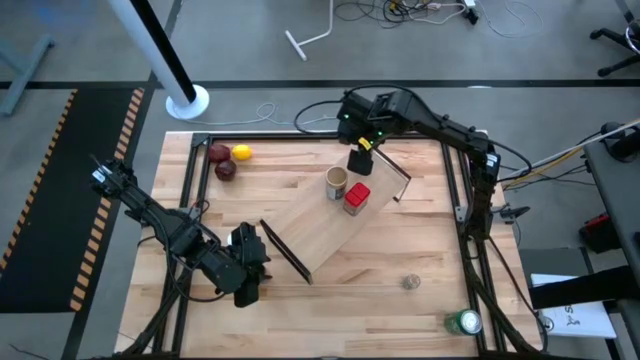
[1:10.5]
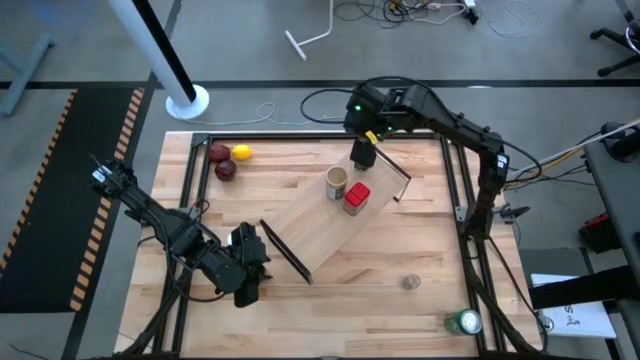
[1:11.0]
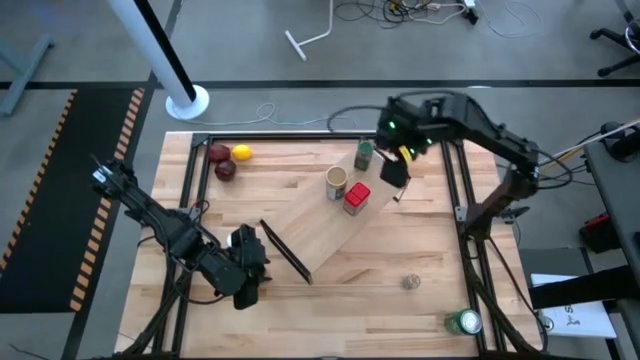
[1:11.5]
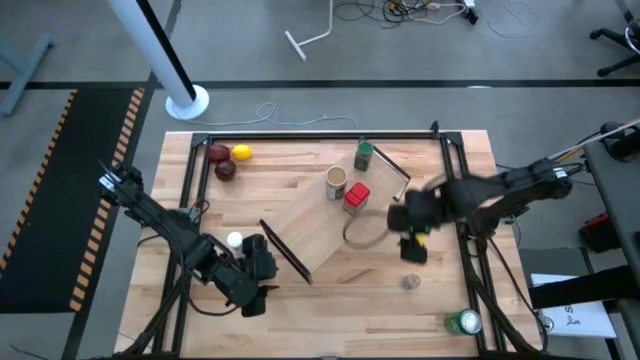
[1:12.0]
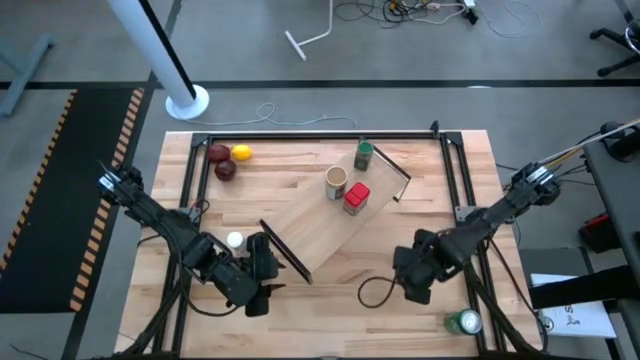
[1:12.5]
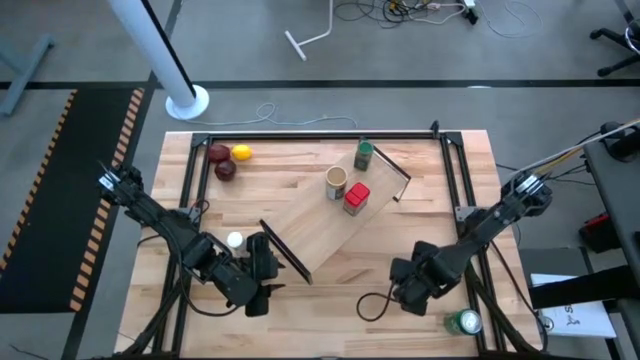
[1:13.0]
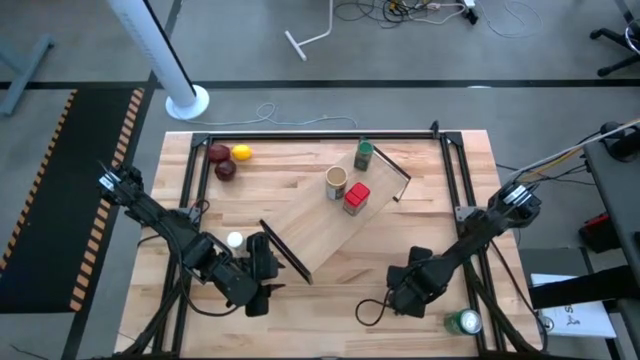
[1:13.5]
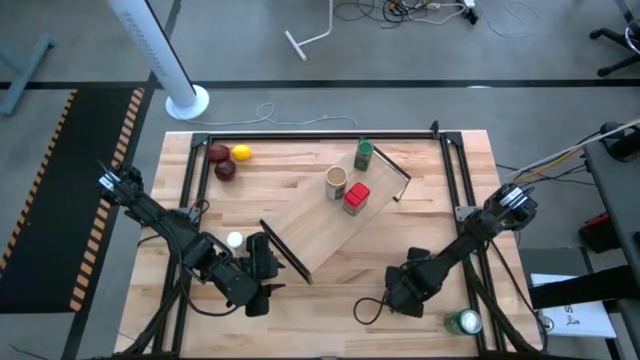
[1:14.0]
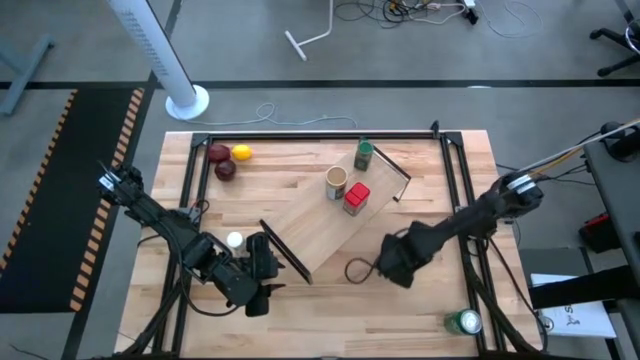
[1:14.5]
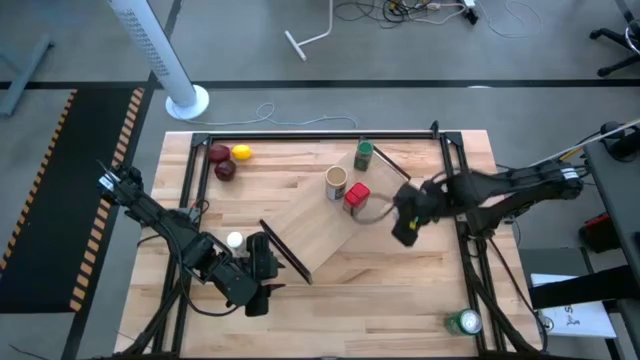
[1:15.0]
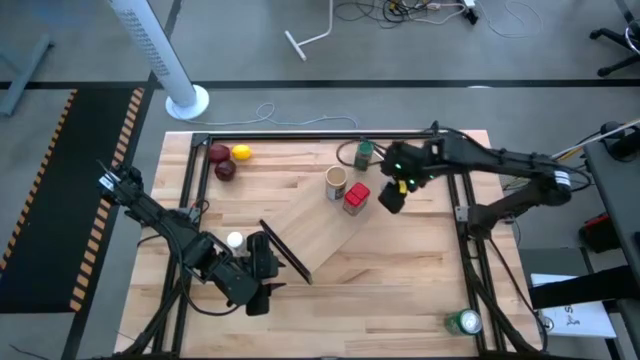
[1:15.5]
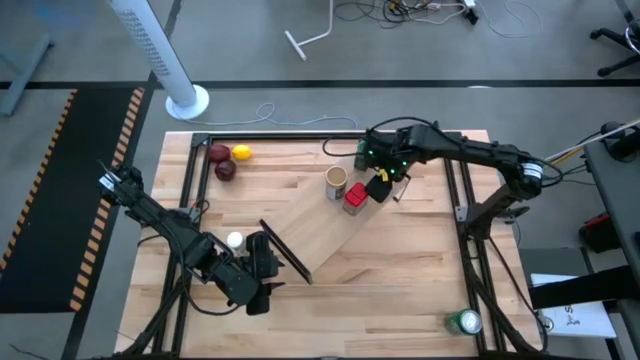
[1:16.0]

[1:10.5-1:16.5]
Task: Shelf spices
Put the brown seasoning bottle on the shelf

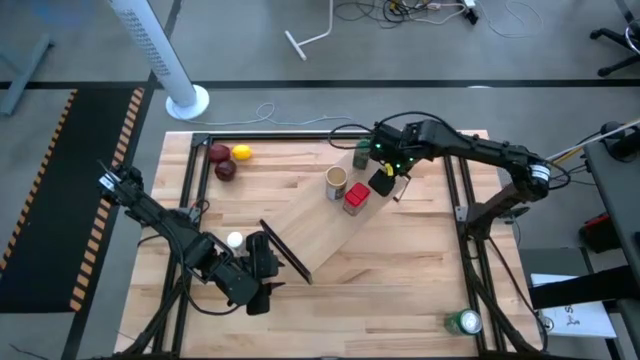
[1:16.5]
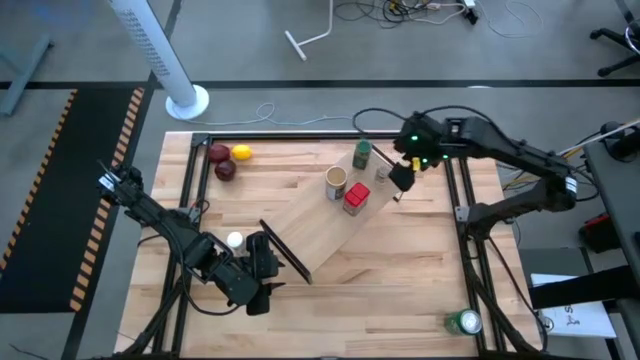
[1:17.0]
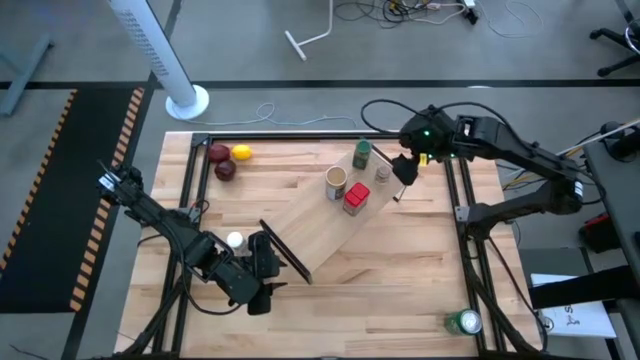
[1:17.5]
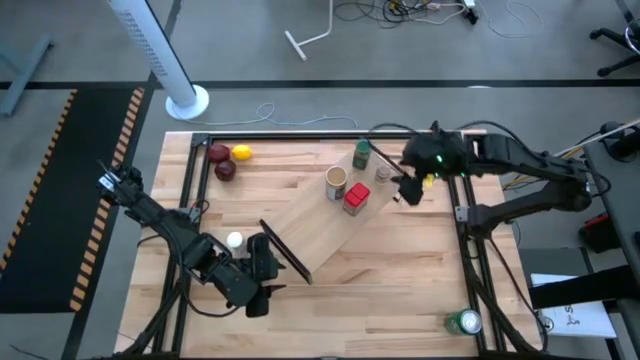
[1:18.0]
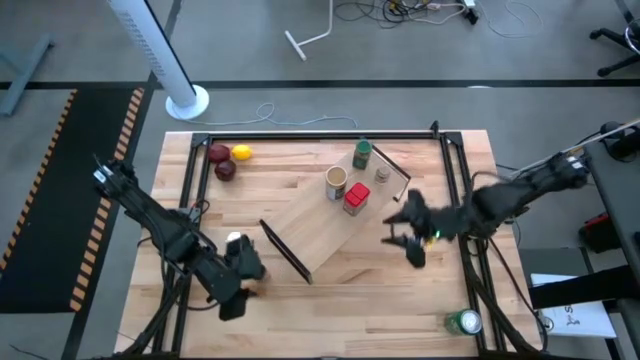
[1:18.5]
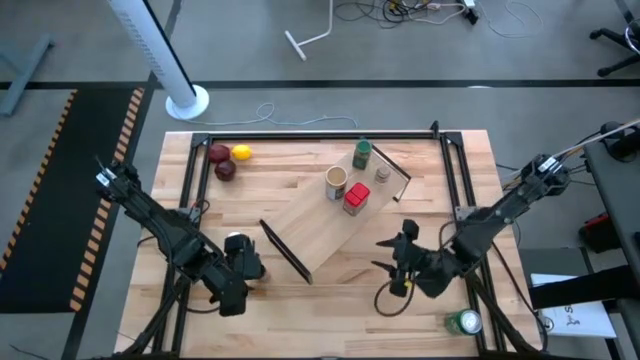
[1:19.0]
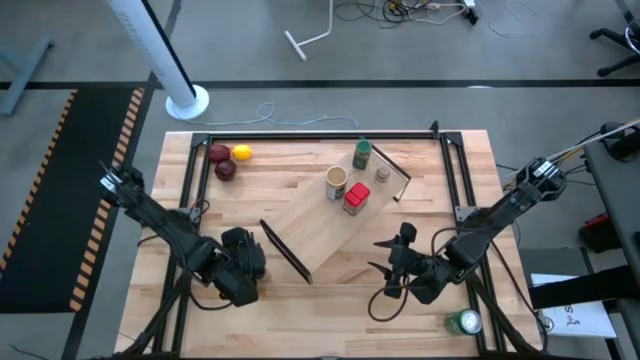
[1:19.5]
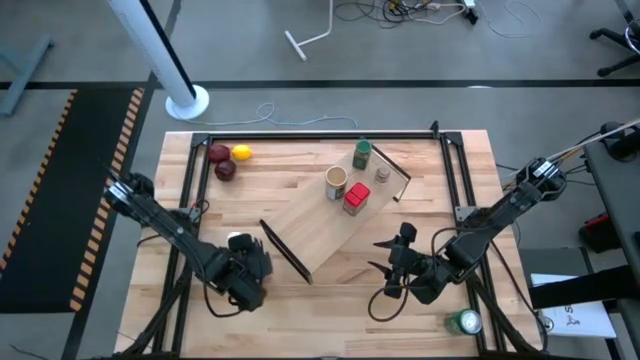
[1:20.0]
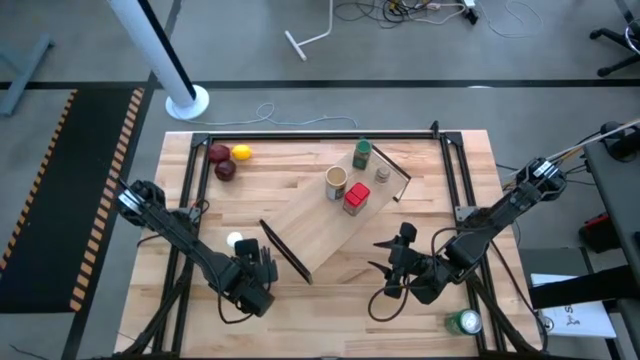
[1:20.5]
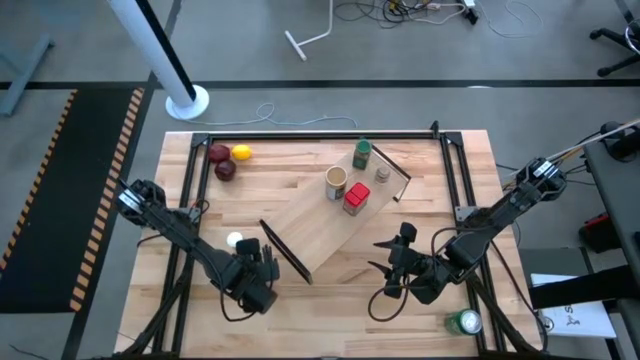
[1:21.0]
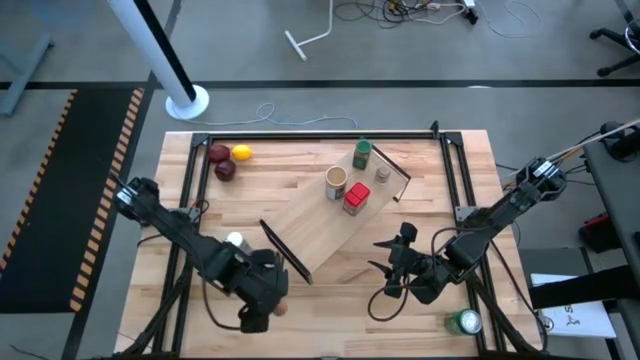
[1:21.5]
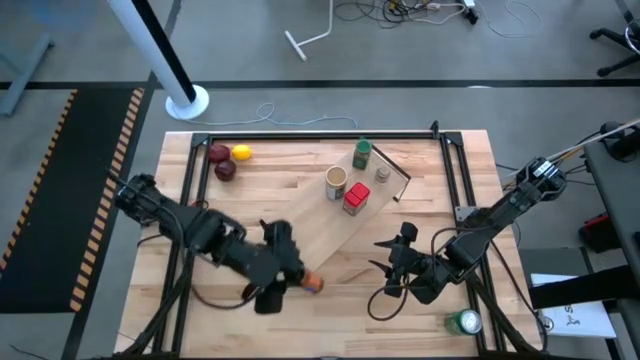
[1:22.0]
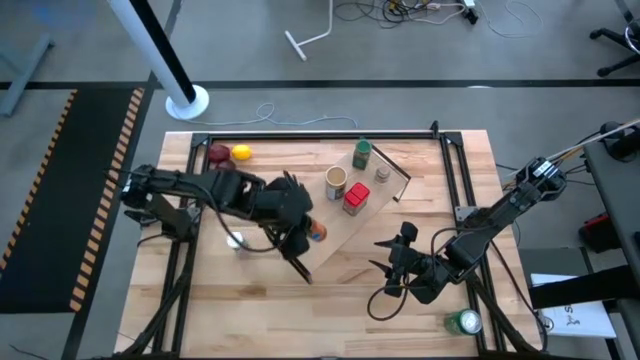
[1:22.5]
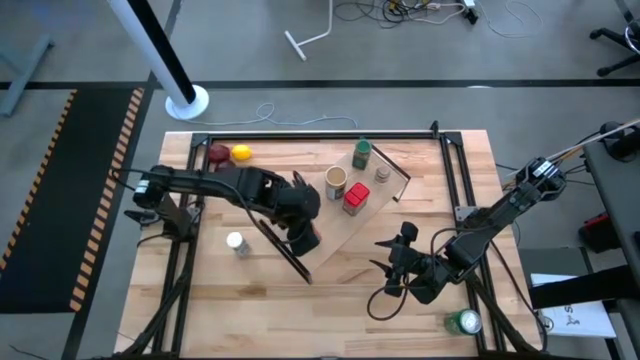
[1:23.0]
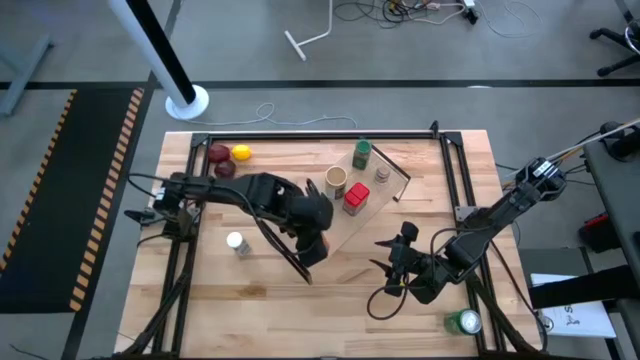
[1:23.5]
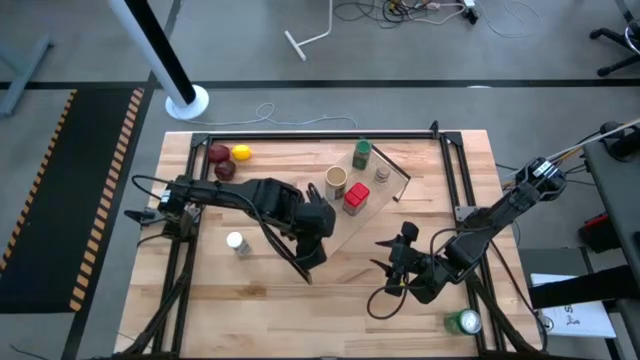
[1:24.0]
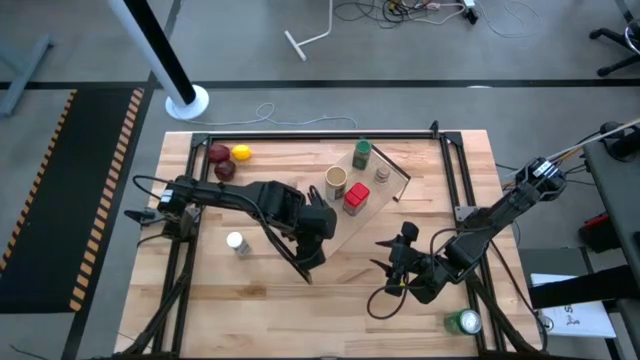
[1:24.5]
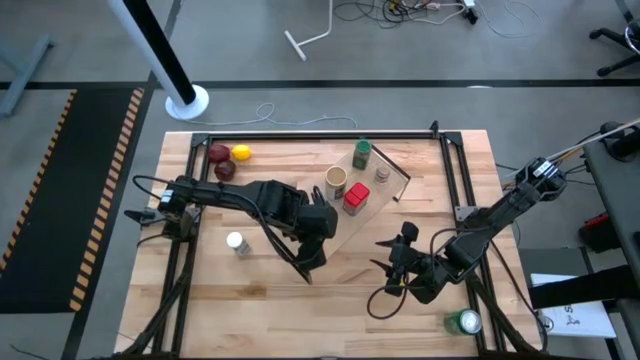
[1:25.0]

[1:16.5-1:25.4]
Put the black seasoning bottle on the shelf

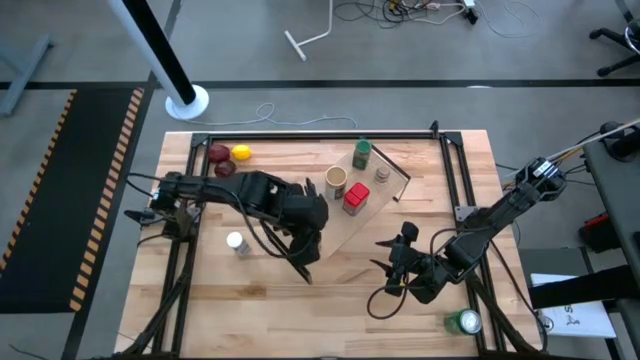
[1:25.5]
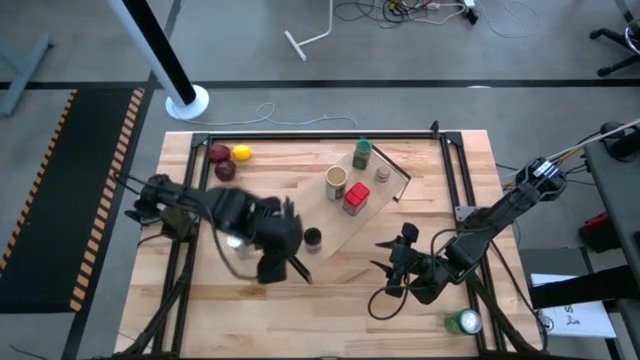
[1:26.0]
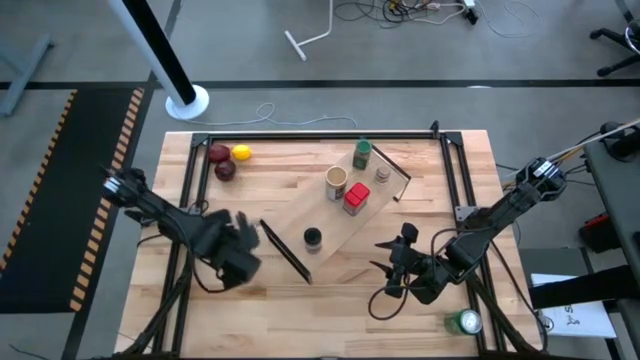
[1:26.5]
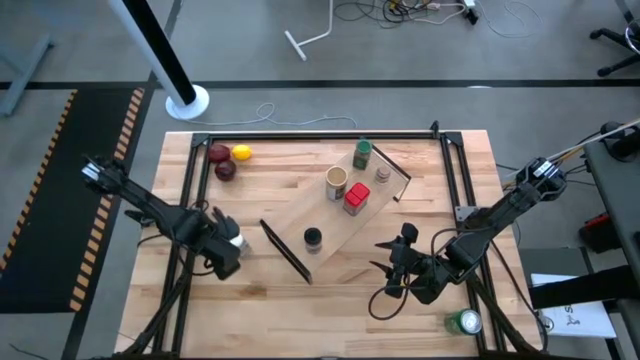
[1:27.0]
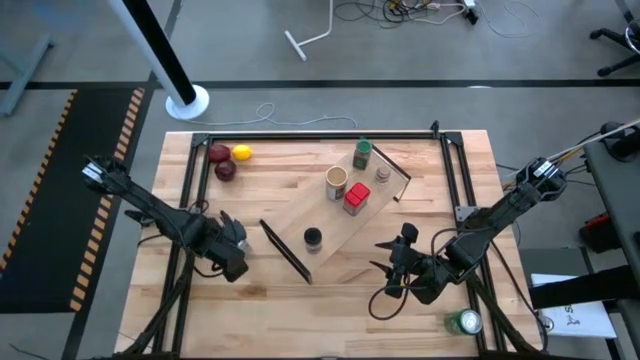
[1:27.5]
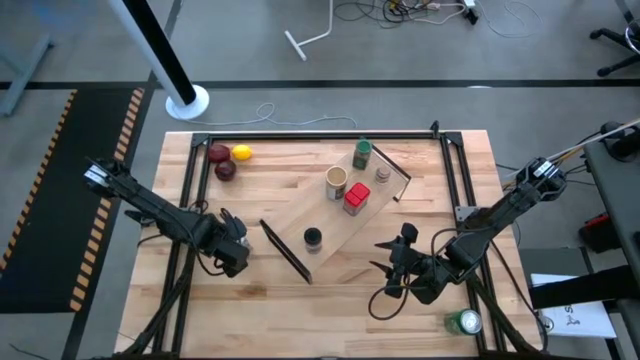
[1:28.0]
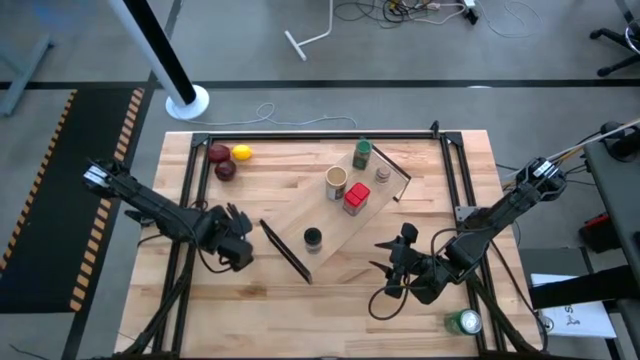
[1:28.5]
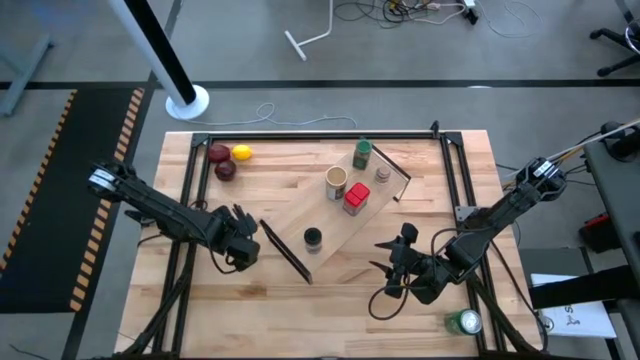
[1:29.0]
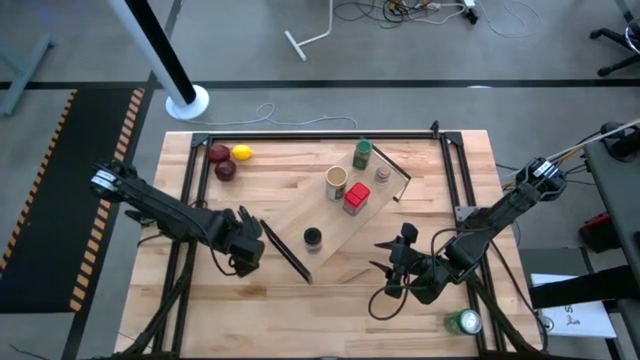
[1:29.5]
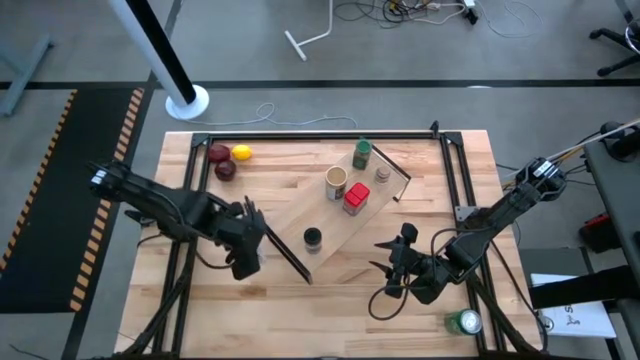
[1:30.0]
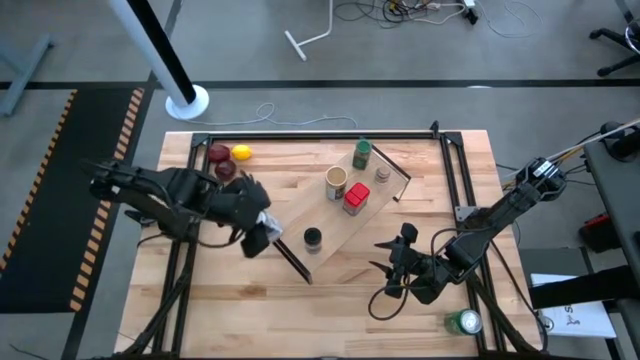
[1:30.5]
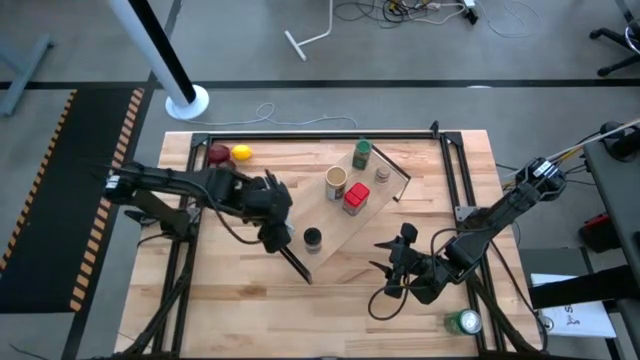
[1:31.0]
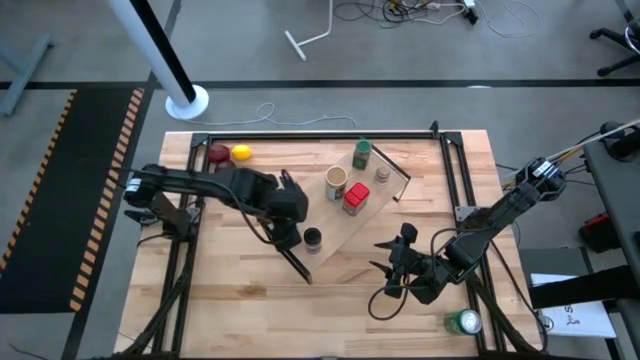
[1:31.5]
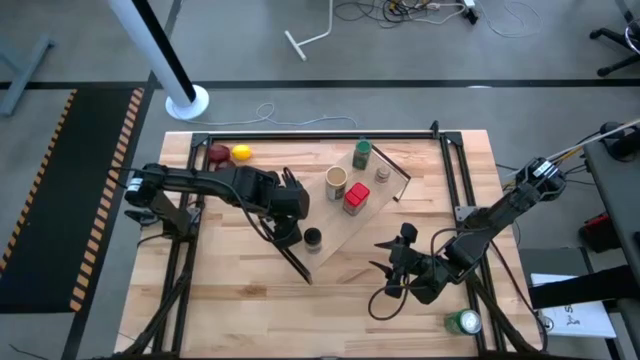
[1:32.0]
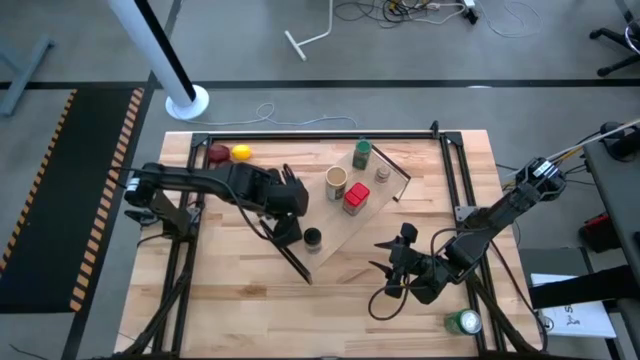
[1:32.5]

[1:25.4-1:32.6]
Put the white seasoning bottle on the shelf
